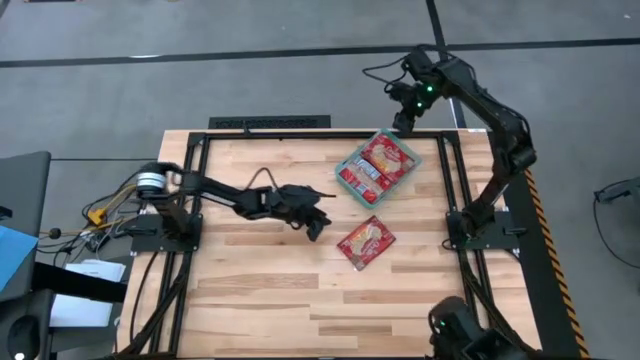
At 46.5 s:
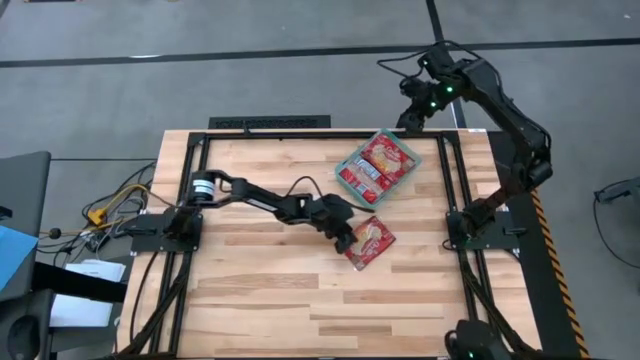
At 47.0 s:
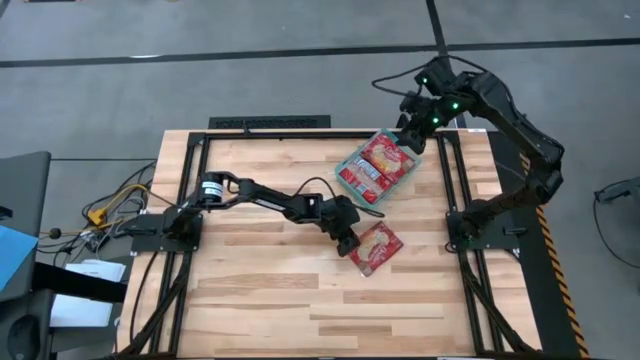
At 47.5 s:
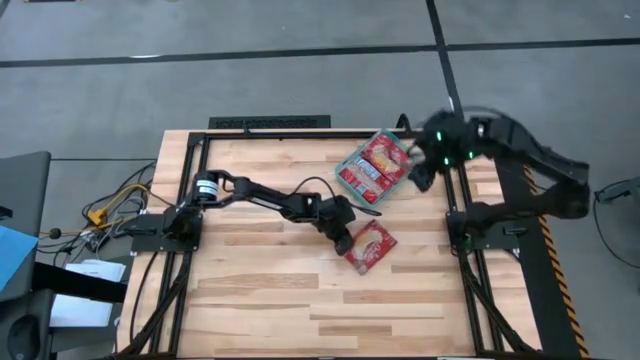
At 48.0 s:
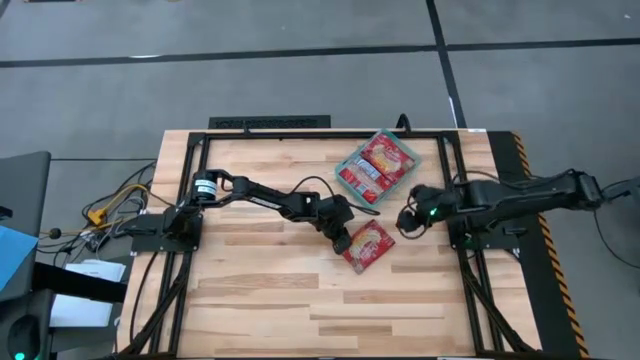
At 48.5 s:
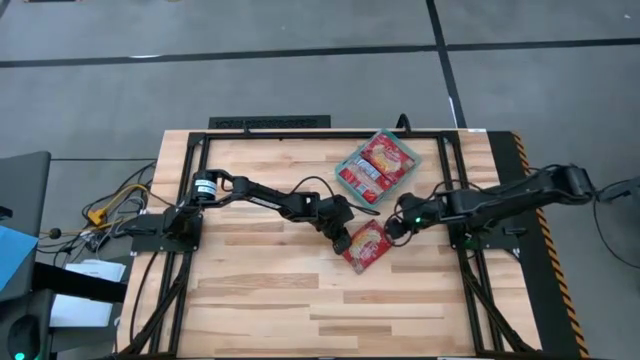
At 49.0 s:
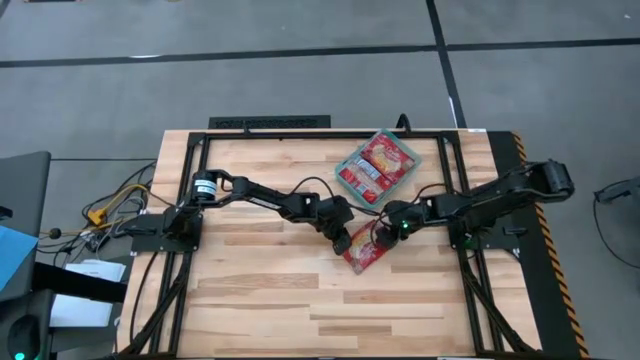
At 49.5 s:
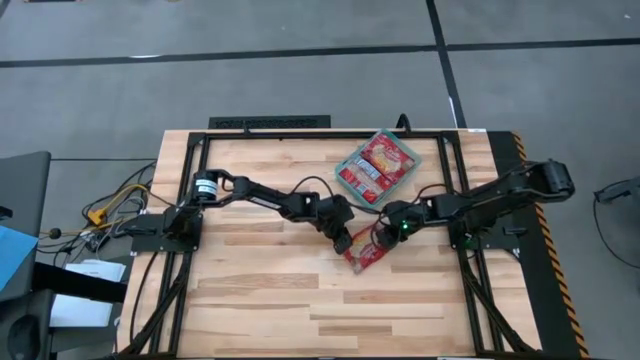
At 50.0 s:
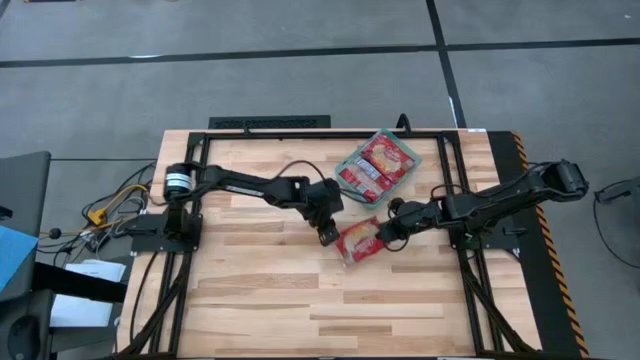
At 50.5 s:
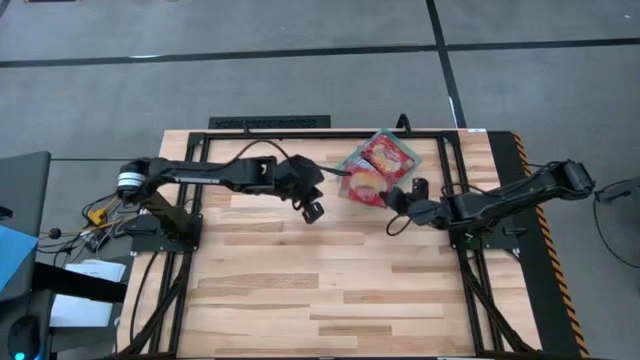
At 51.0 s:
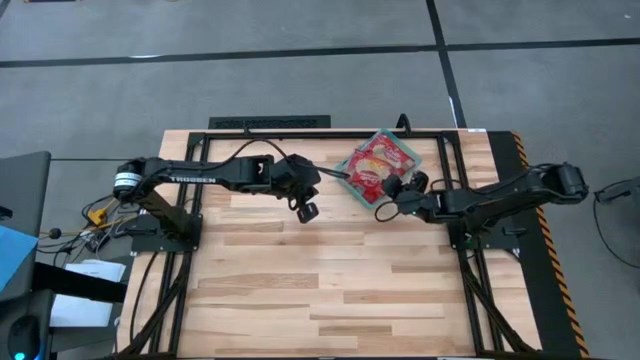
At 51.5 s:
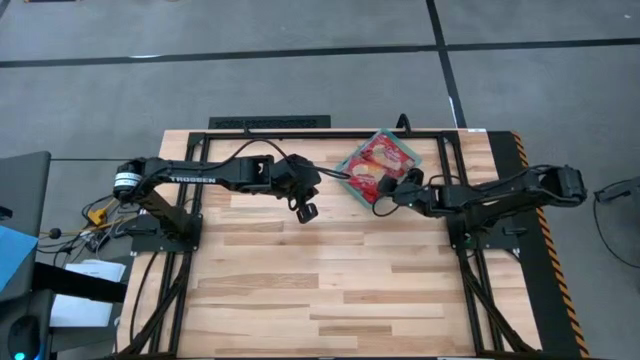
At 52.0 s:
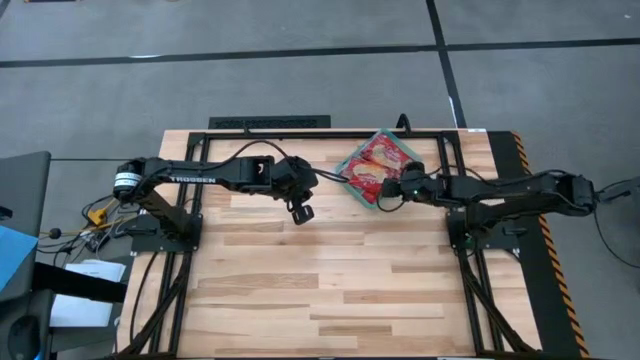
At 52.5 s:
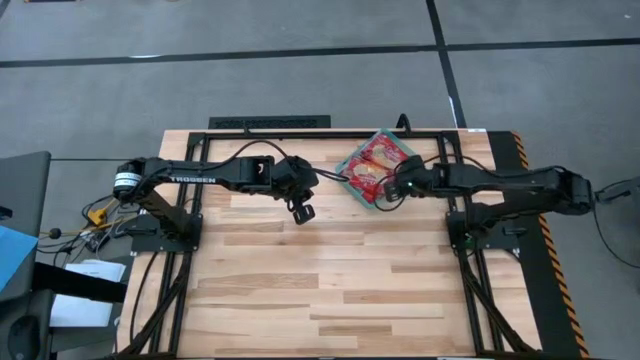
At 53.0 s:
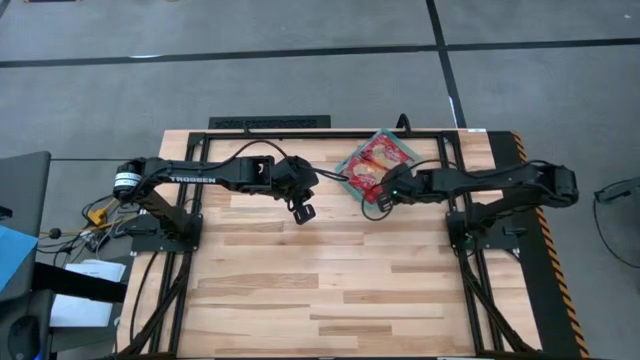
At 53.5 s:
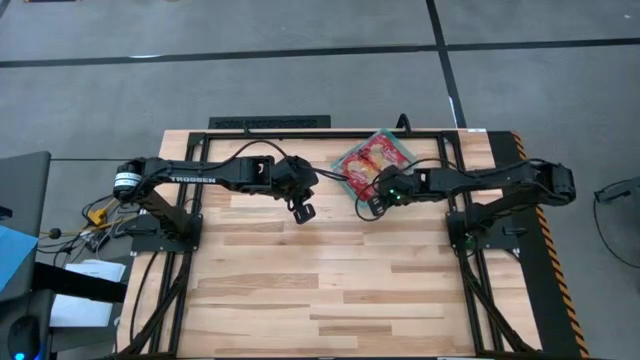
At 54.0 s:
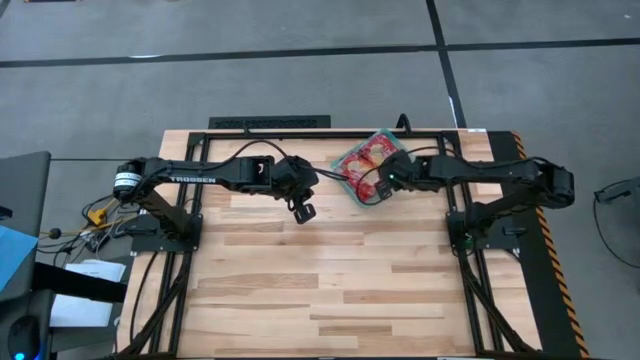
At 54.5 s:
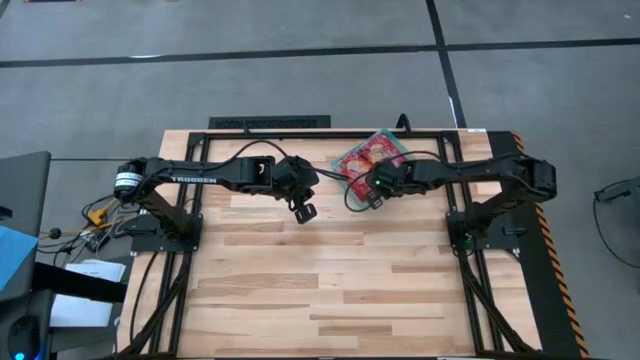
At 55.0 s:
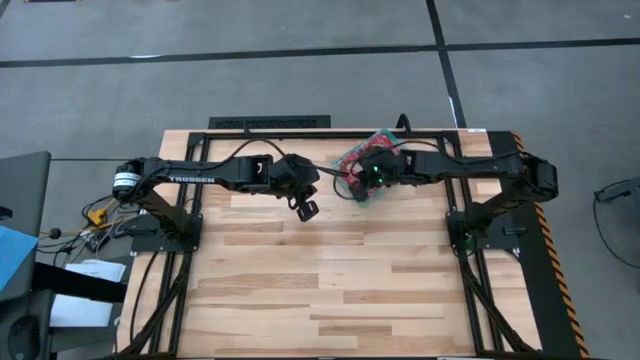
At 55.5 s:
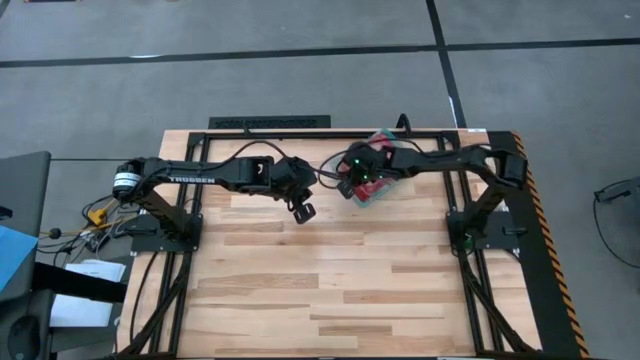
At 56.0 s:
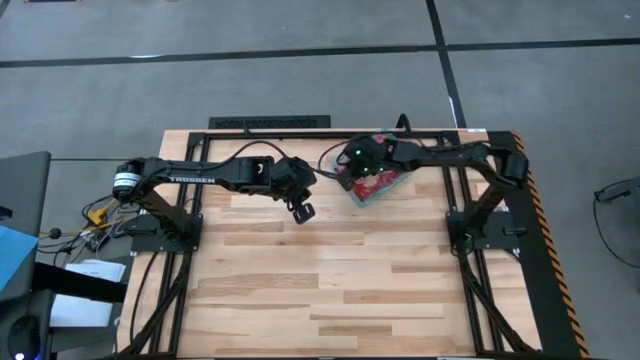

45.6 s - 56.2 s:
Task: Sort popcorn bags into baskets
Put the red popcorn bag into the green bin

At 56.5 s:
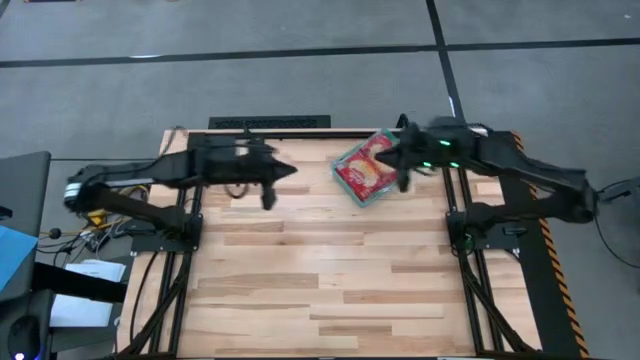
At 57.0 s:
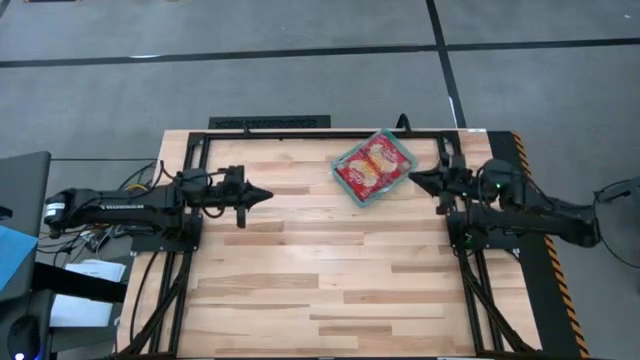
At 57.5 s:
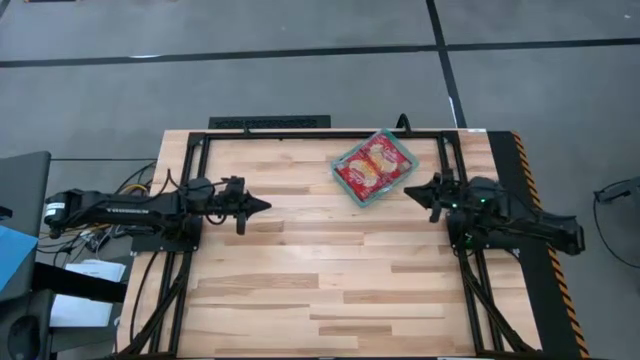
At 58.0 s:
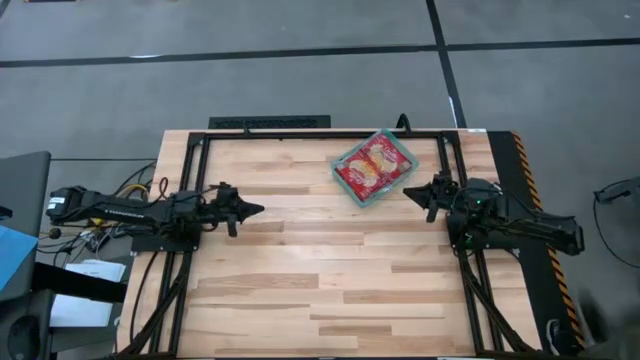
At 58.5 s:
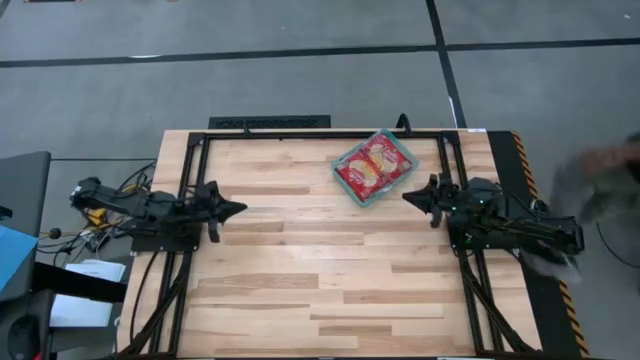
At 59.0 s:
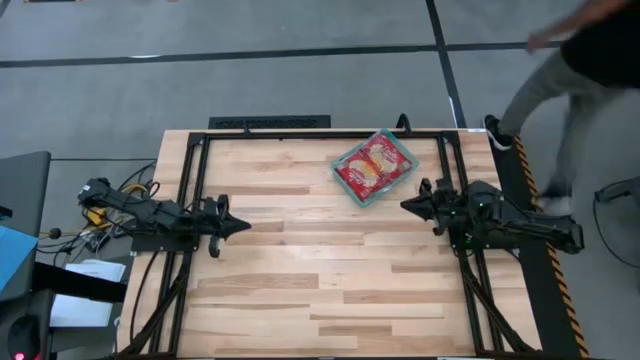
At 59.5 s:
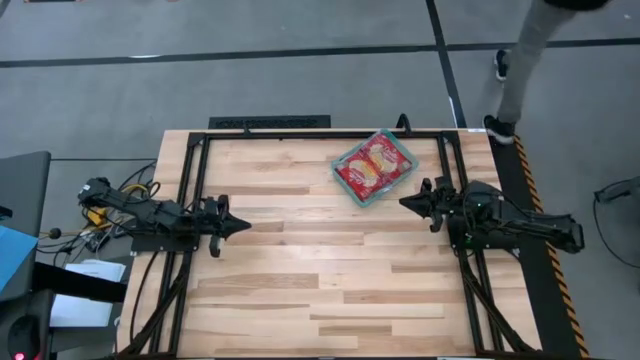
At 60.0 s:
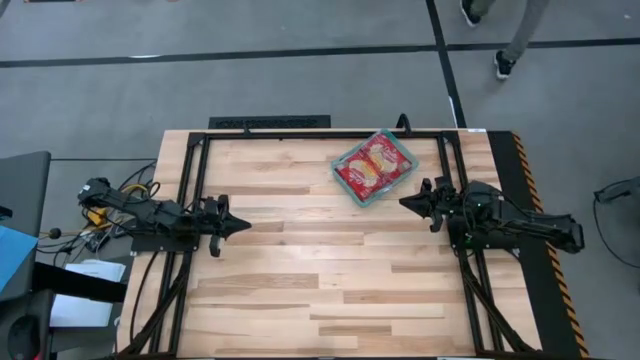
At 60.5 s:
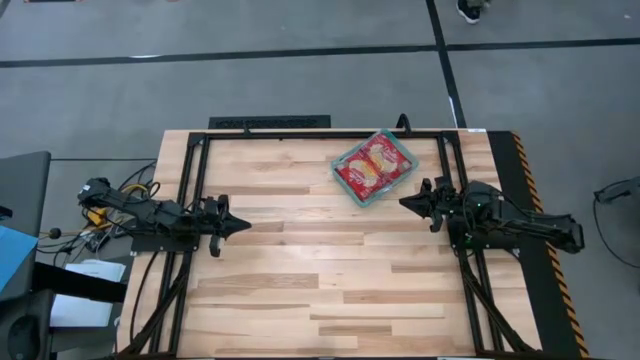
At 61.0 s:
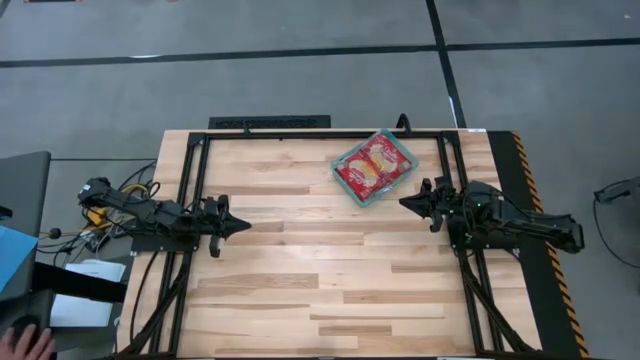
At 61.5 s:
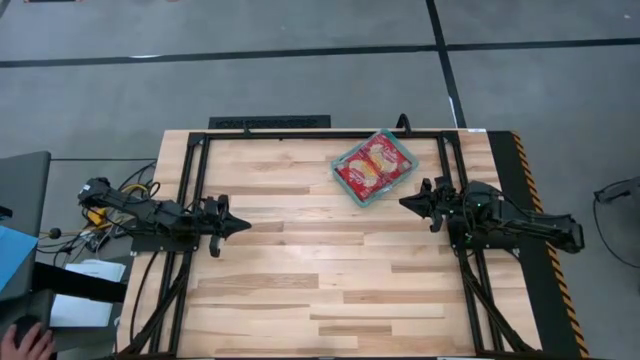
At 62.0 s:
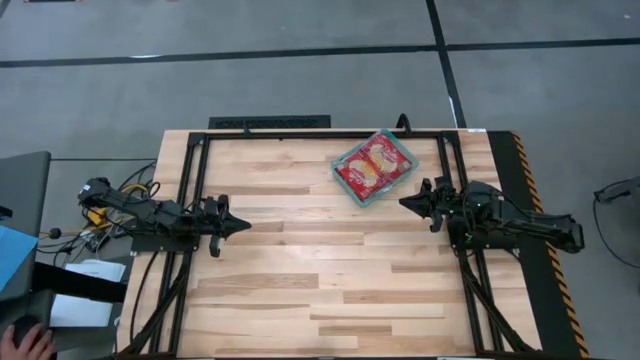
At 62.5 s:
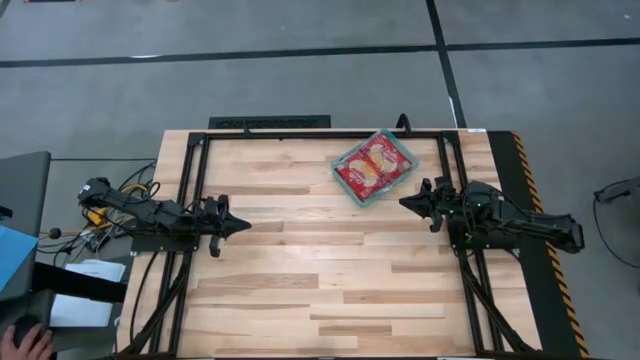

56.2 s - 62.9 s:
Return to Home Position

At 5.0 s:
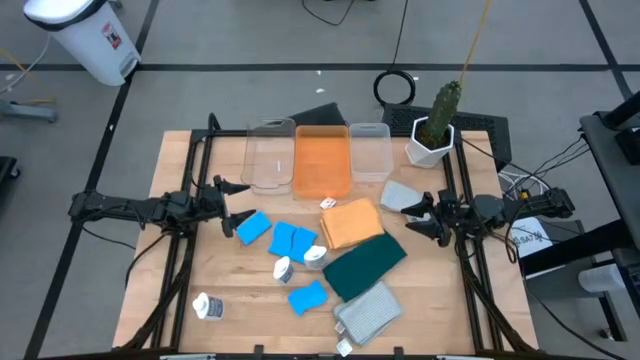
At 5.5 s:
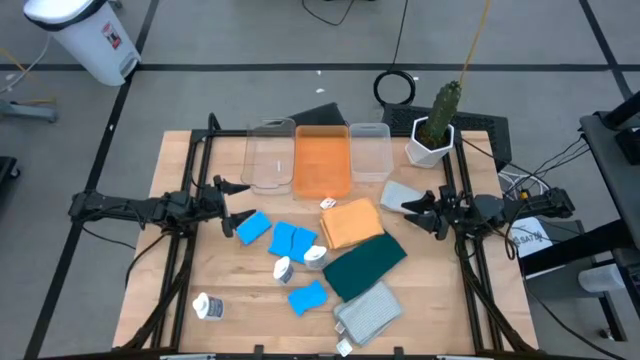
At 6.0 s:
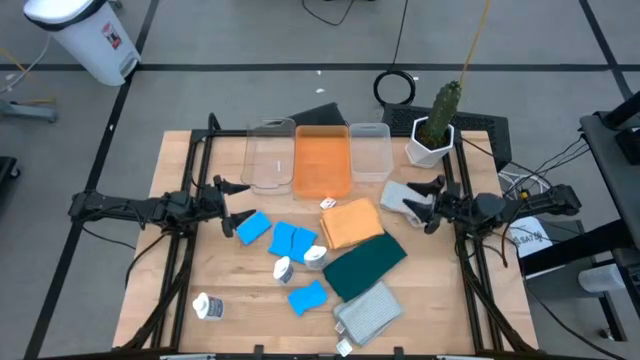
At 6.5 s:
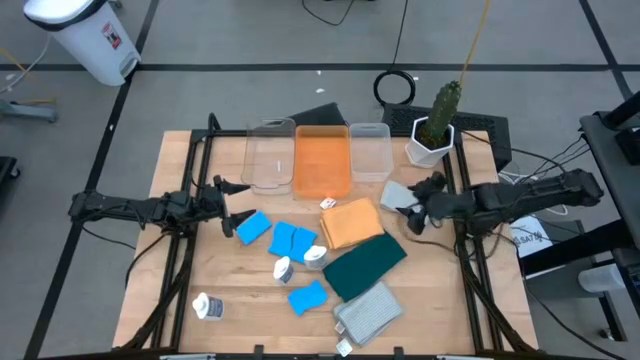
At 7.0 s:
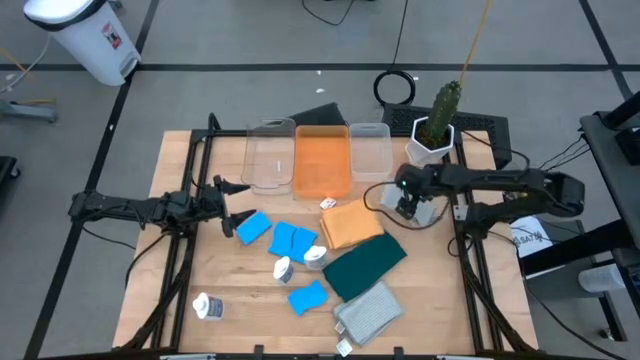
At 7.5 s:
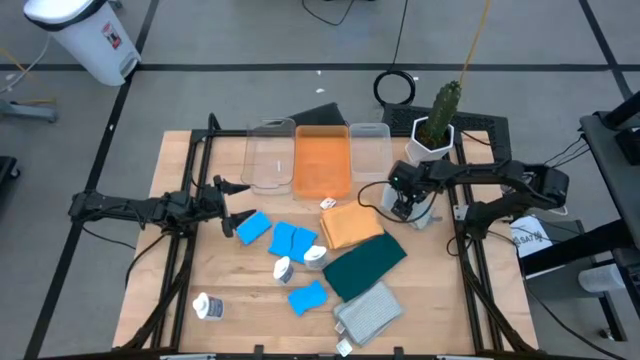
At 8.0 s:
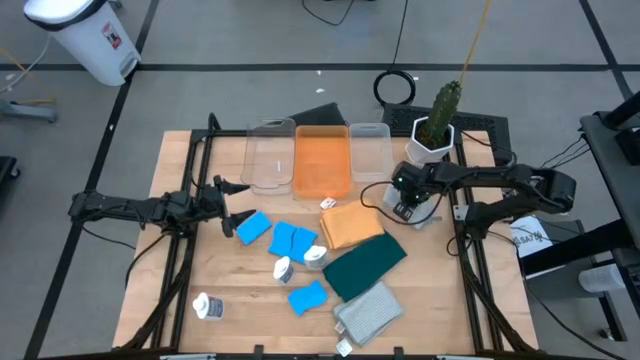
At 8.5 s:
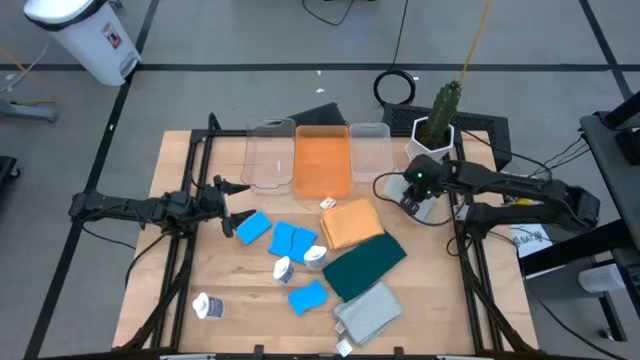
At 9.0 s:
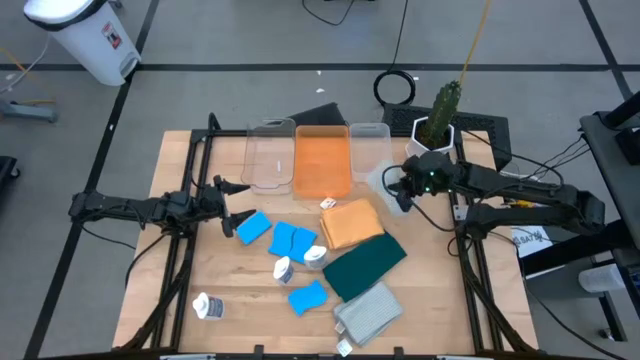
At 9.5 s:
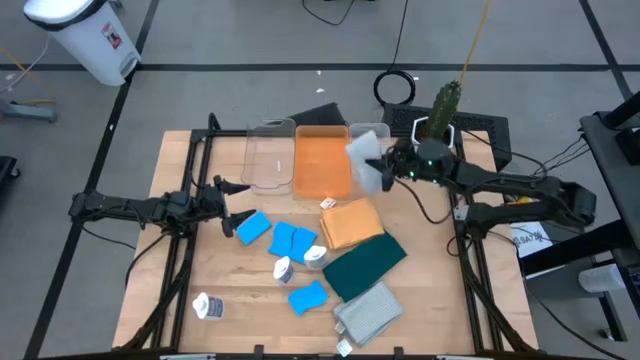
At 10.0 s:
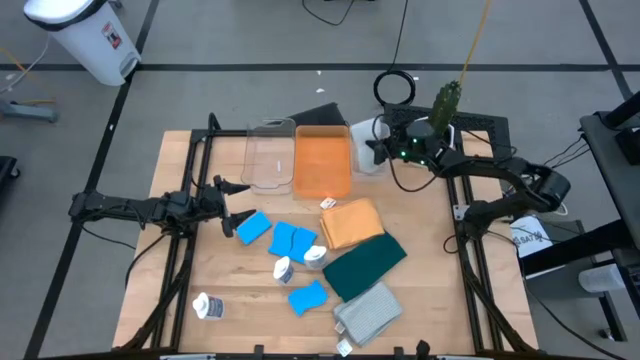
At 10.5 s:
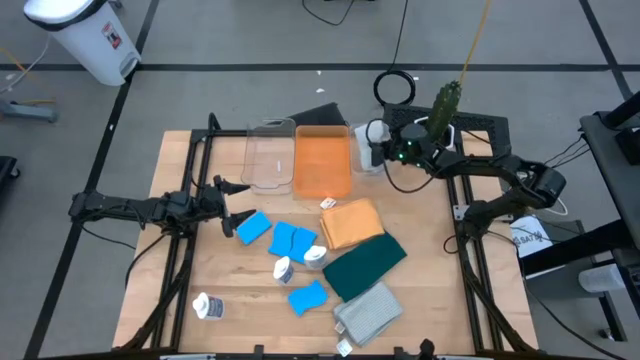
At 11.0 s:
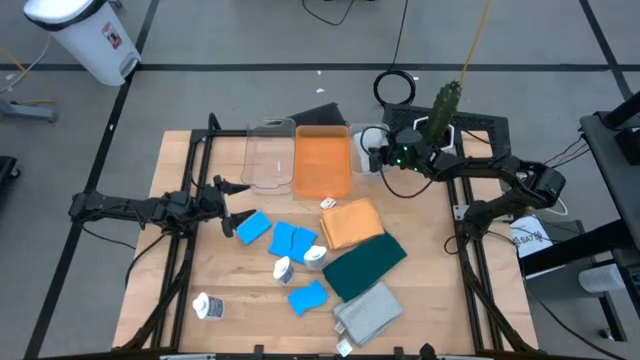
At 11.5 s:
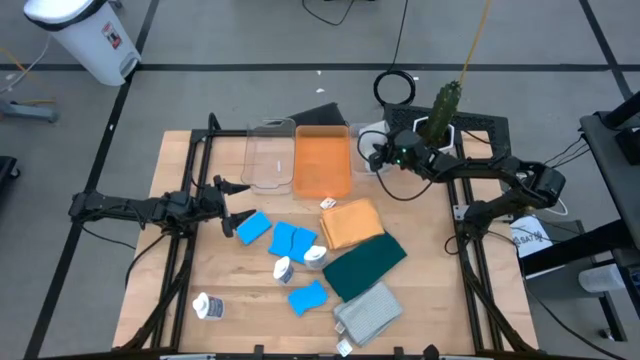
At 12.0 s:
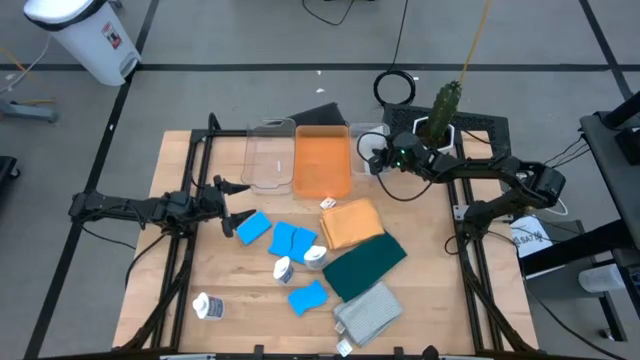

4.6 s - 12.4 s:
Task: Pick & Place Kitchen Items
Put the gray microfiber cloth into the white bin
